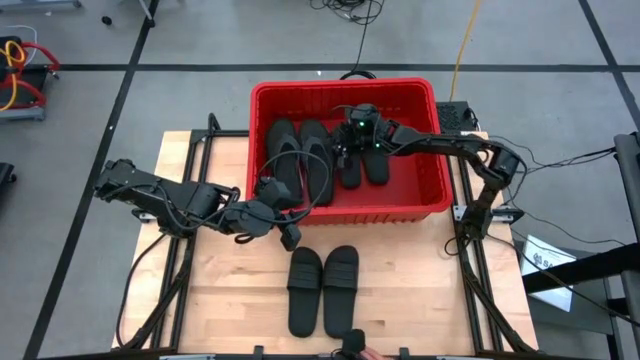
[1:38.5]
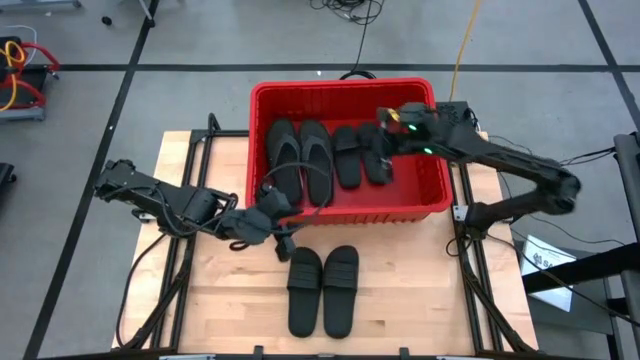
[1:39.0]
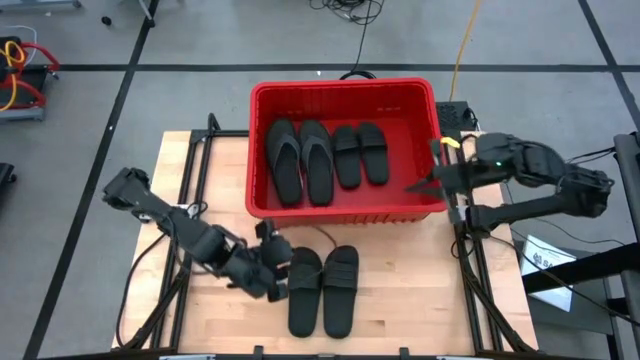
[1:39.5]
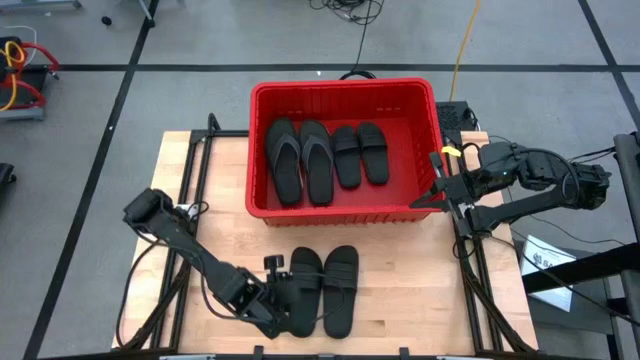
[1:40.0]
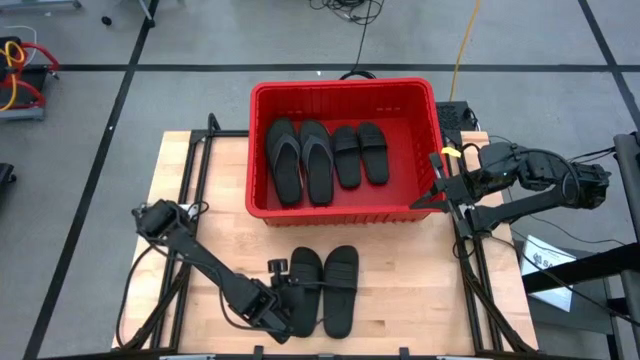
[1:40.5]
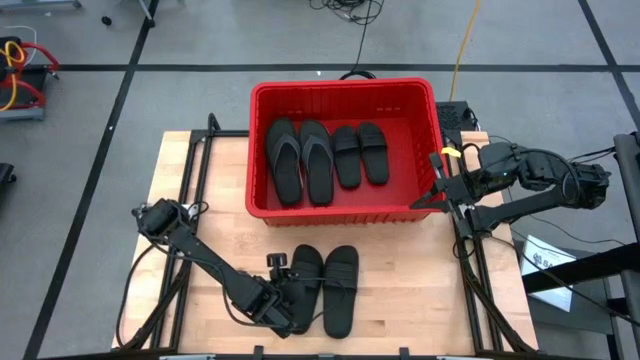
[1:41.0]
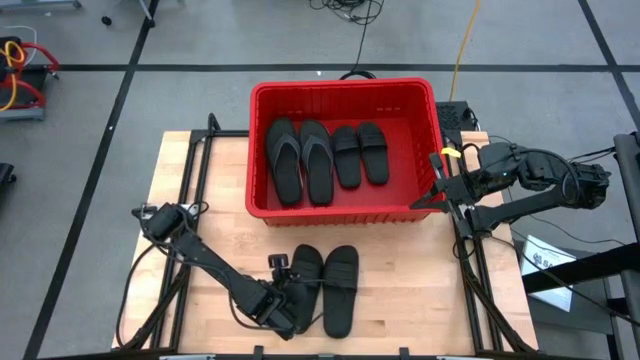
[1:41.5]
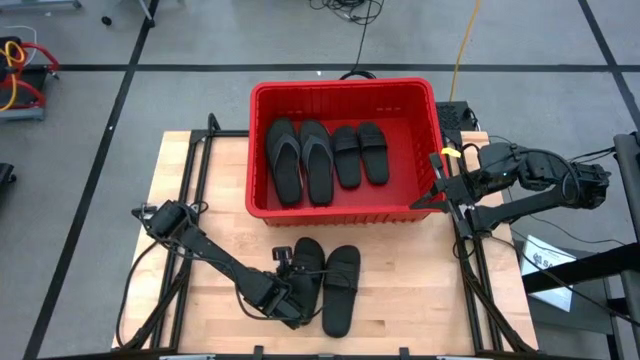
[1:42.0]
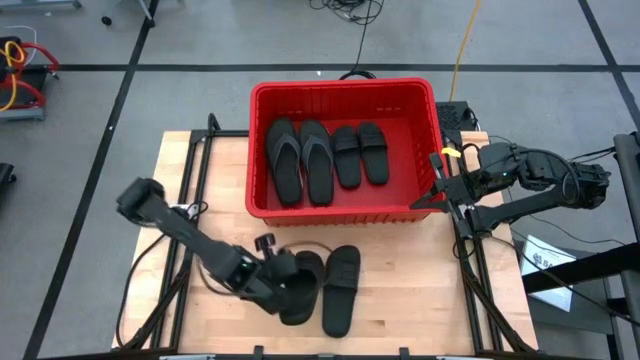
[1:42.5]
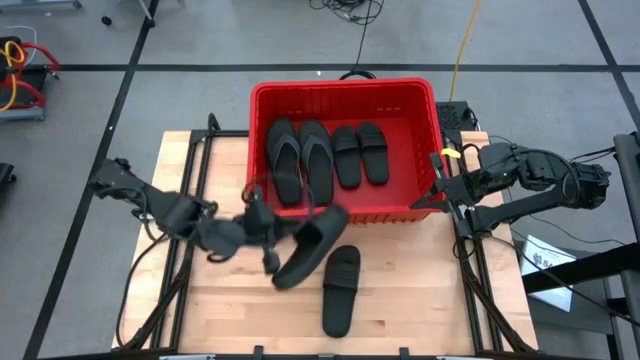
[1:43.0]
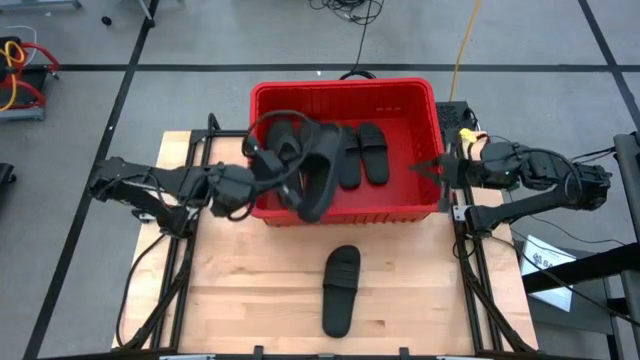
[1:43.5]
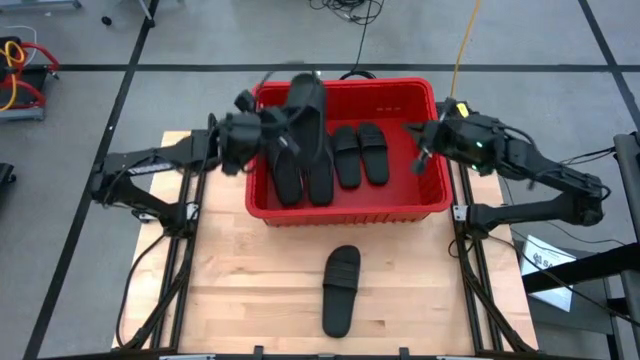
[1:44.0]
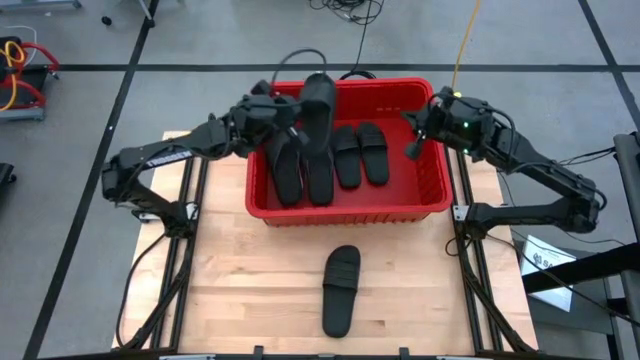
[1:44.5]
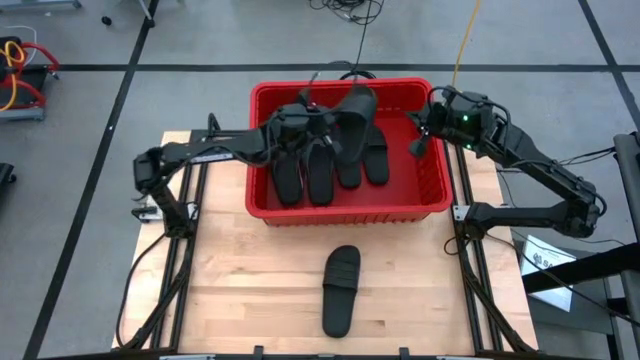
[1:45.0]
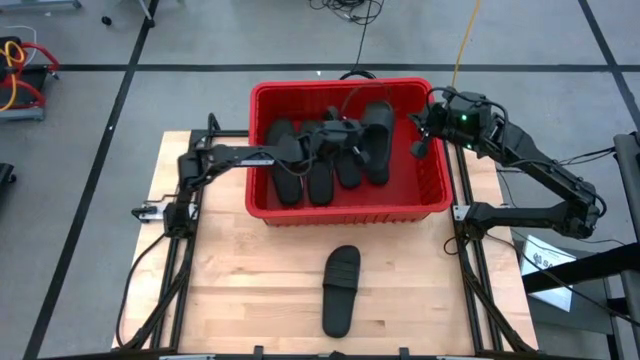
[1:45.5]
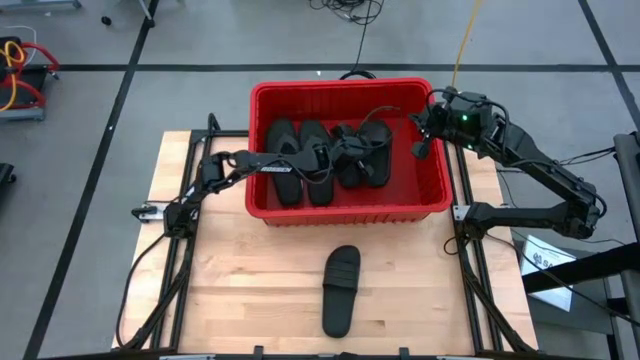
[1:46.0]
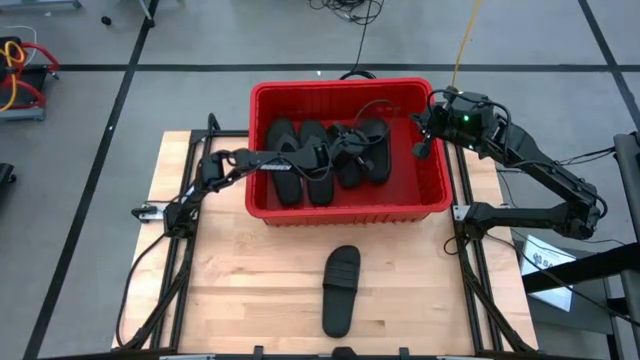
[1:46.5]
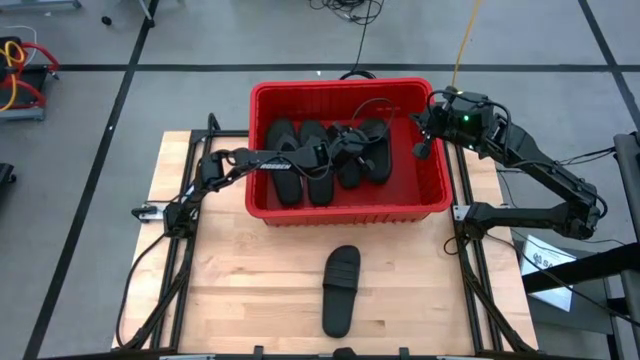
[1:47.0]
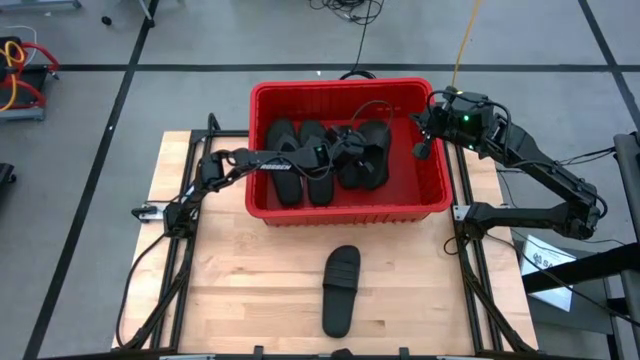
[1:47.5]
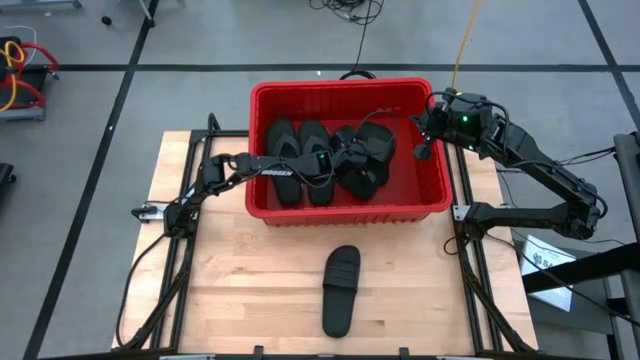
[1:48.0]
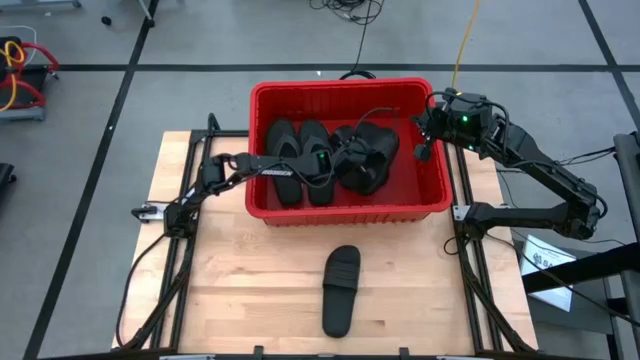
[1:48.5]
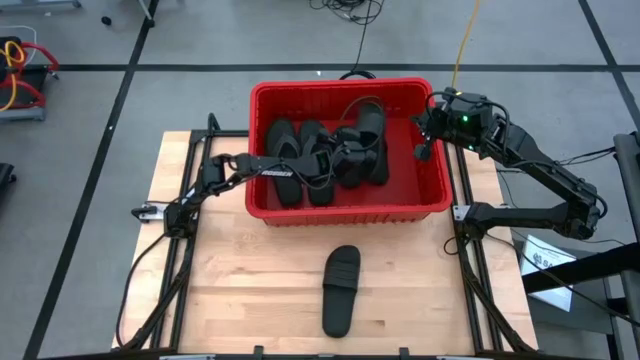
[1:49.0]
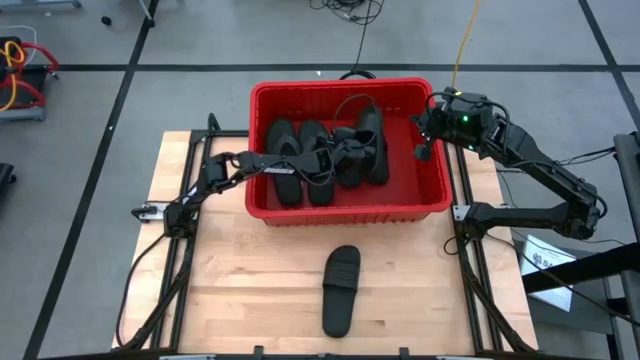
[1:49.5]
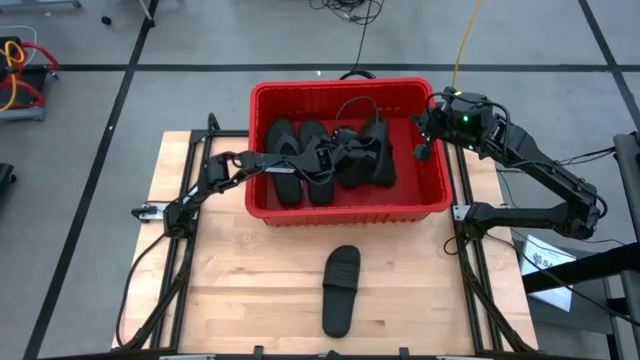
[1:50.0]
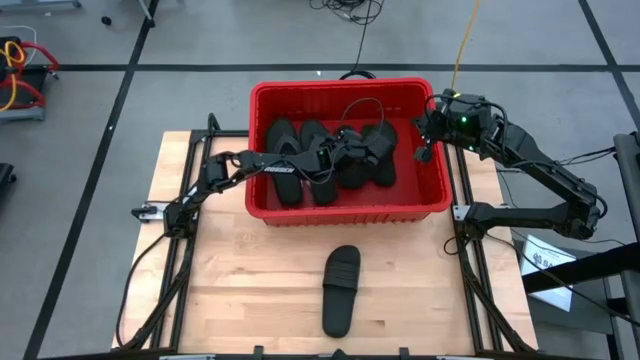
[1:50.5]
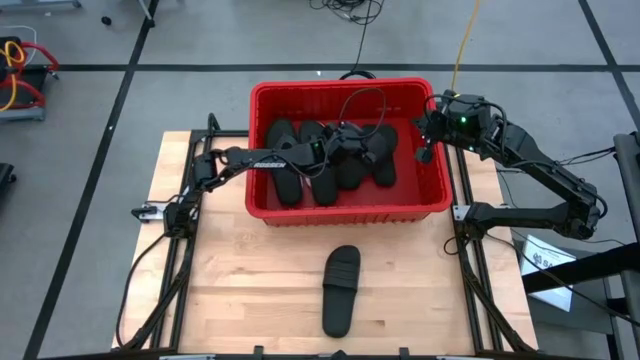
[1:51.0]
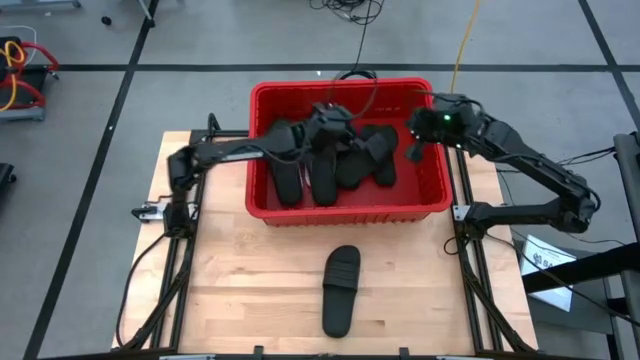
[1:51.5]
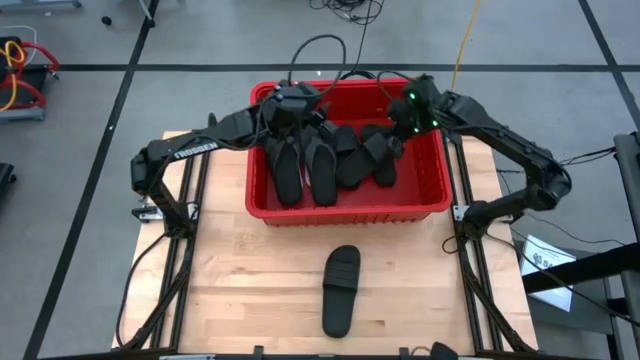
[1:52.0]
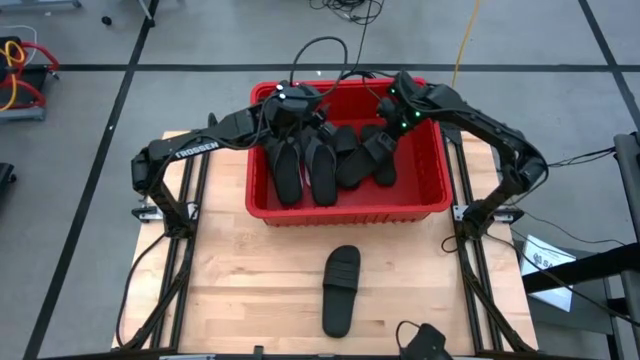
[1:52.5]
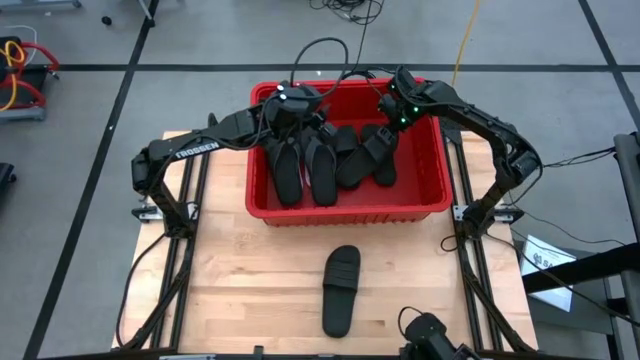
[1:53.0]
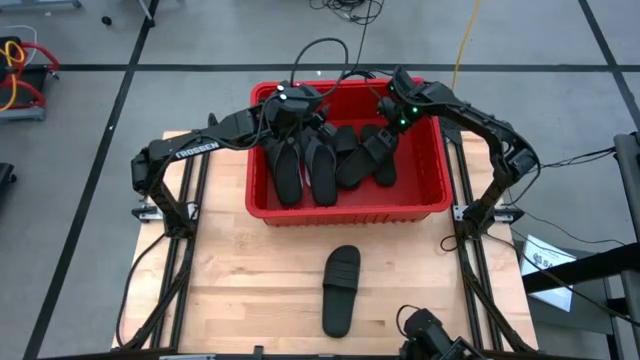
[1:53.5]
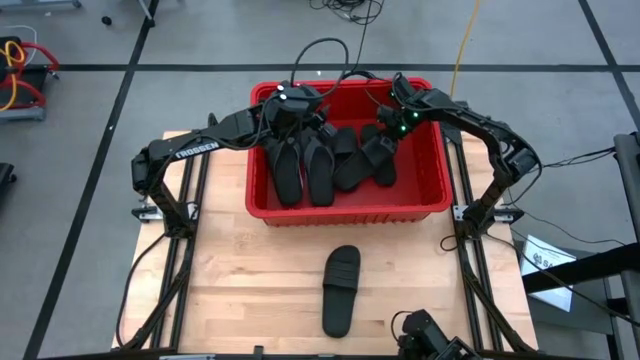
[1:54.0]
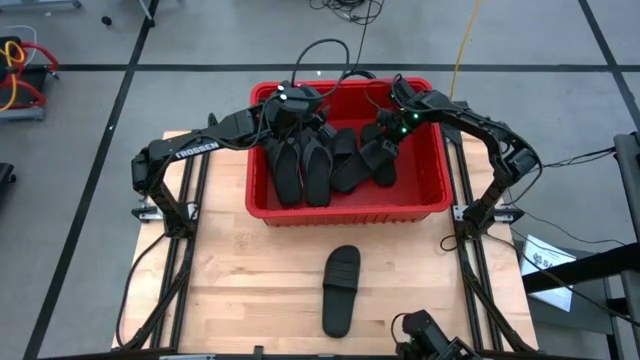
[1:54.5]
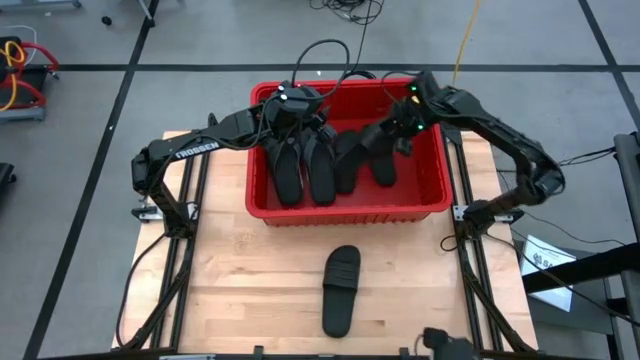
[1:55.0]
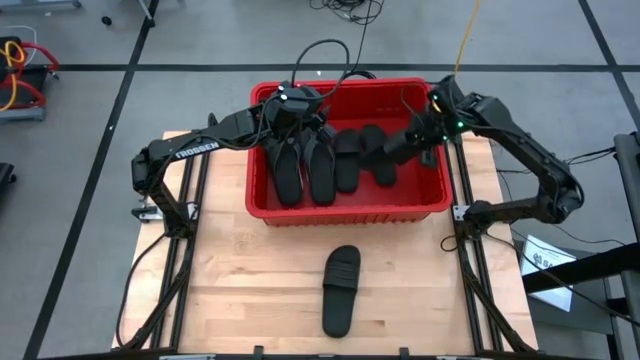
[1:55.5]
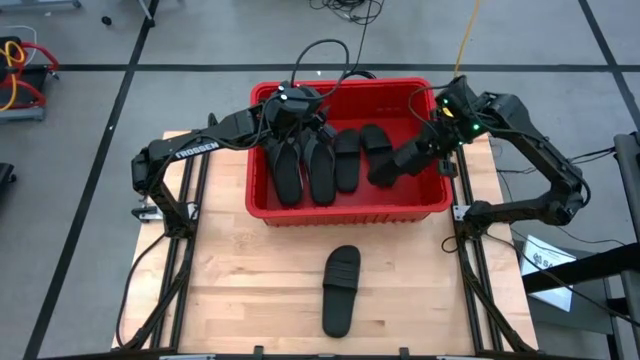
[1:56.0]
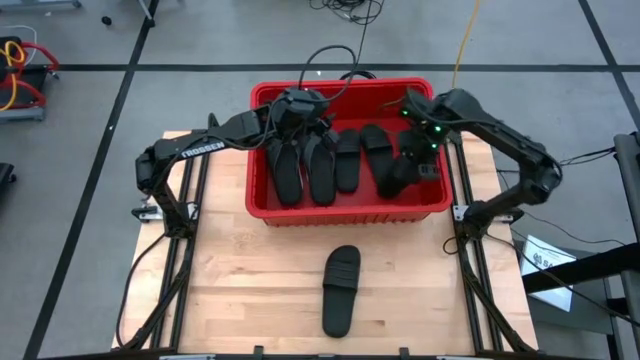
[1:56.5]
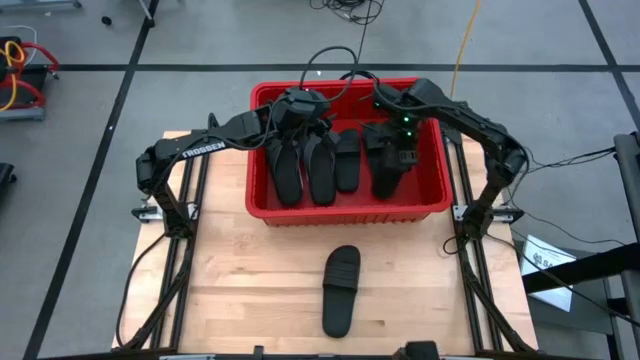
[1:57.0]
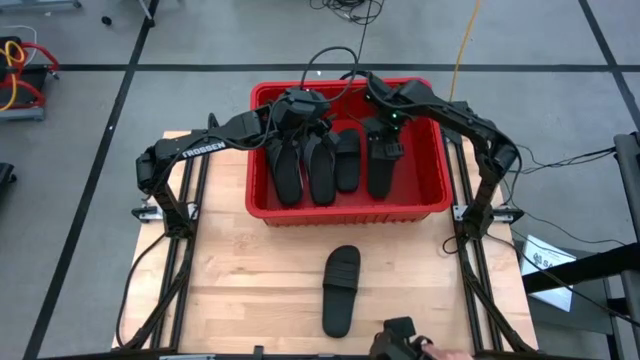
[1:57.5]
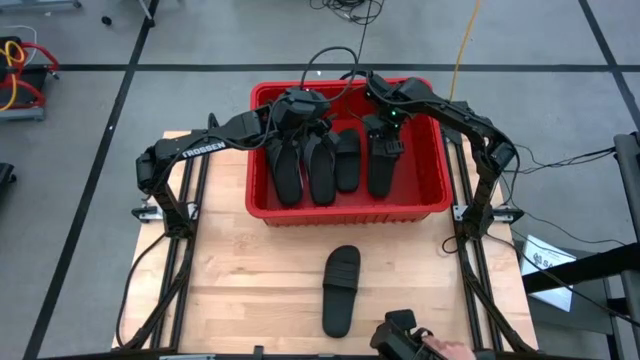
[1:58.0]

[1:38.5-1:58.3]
Task: Pick and place slides into bin
Put the black slide into the red bin

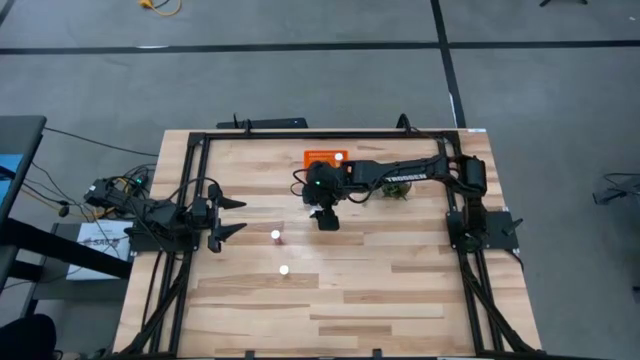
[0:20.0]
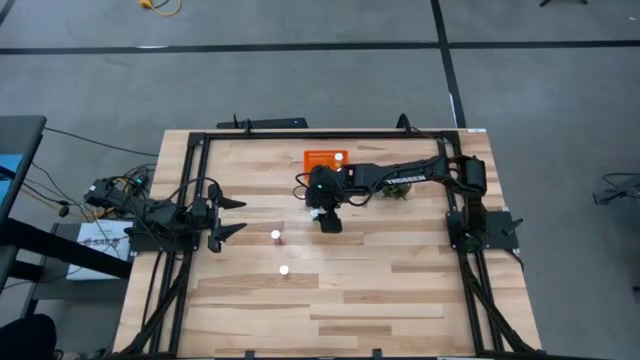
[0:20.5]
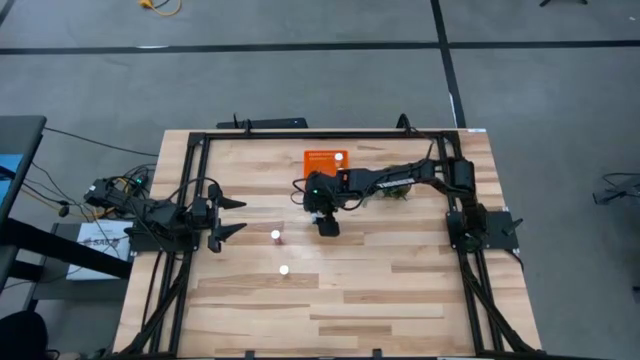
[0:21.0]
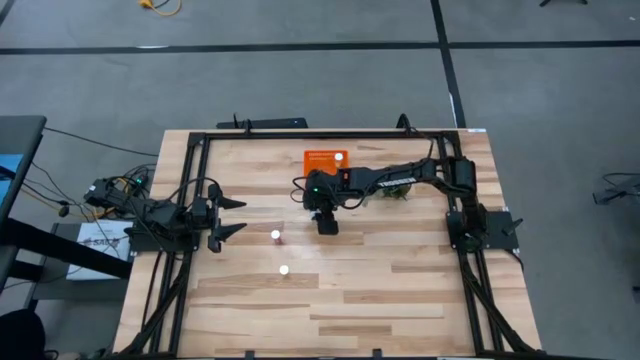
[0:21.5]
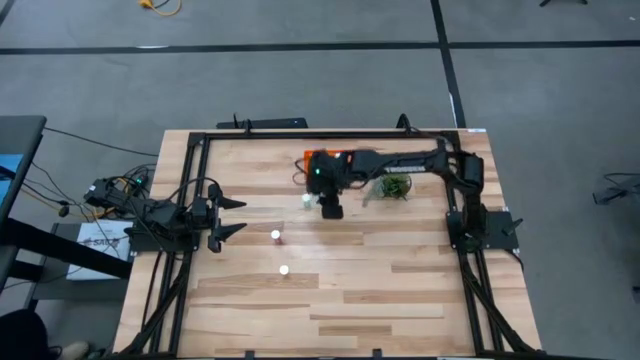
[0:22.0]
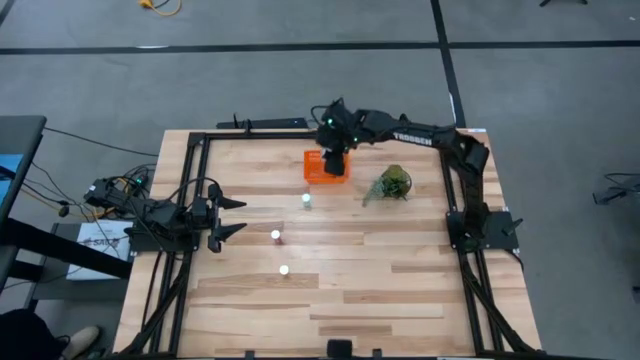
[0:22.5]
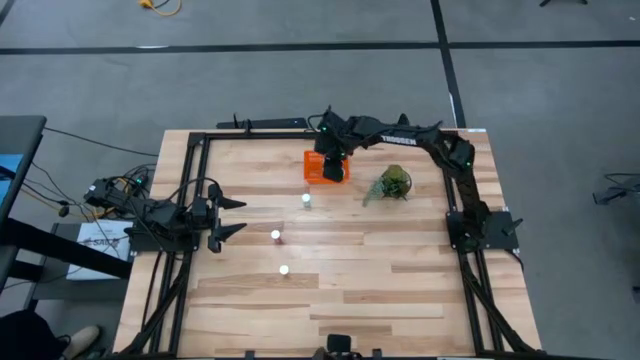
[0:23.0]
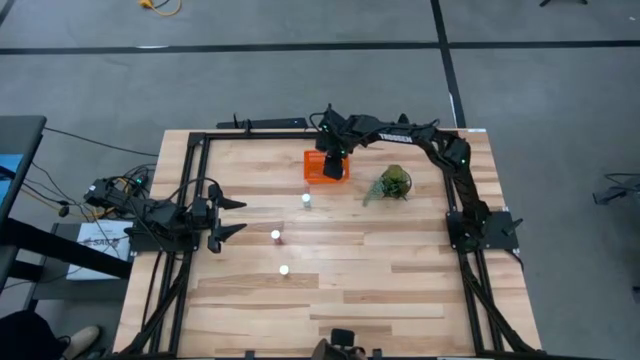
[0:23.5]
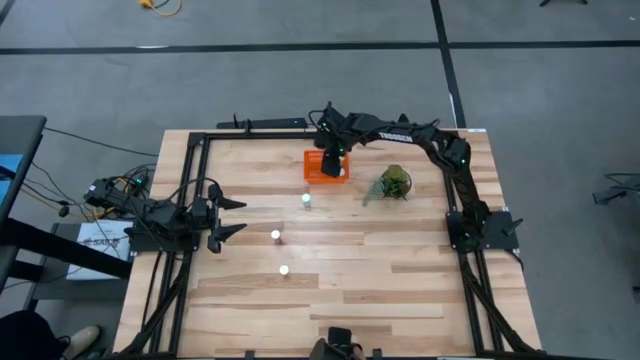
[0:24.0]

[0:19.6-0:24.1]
Task: Pick and place pill bottles into a basket
Put the bottom blue pill bottle into the orange bin
